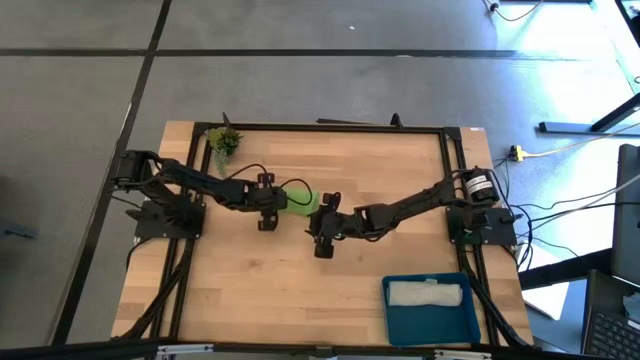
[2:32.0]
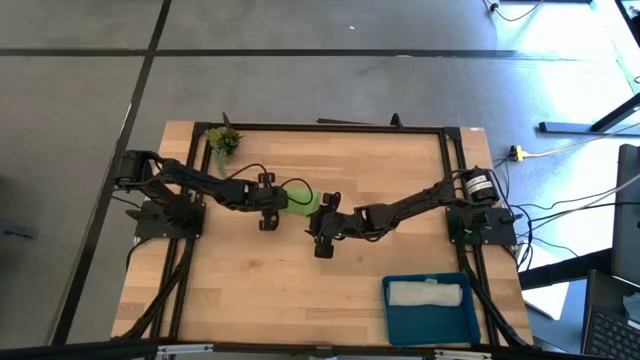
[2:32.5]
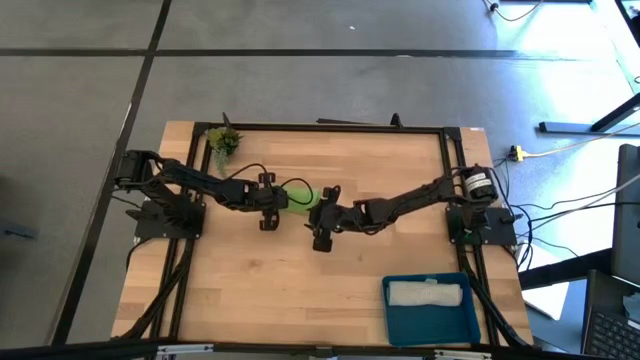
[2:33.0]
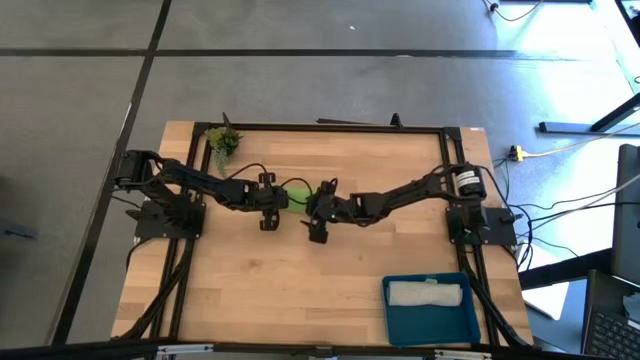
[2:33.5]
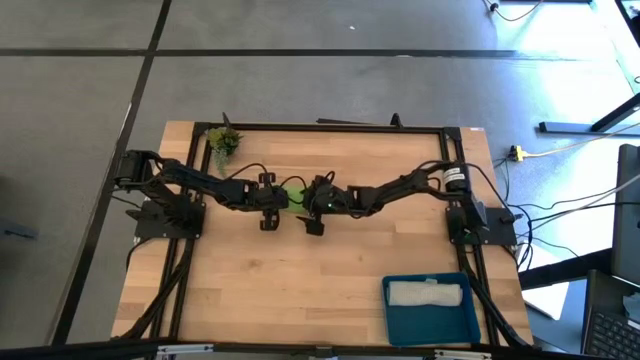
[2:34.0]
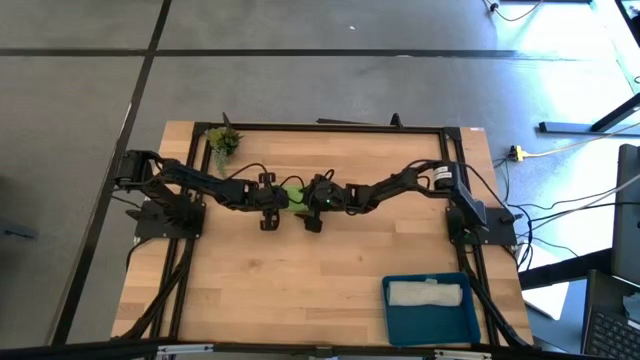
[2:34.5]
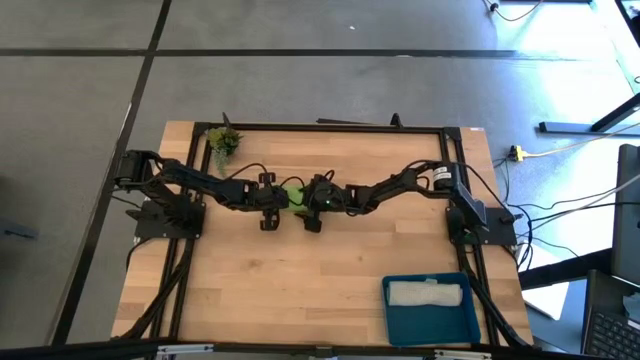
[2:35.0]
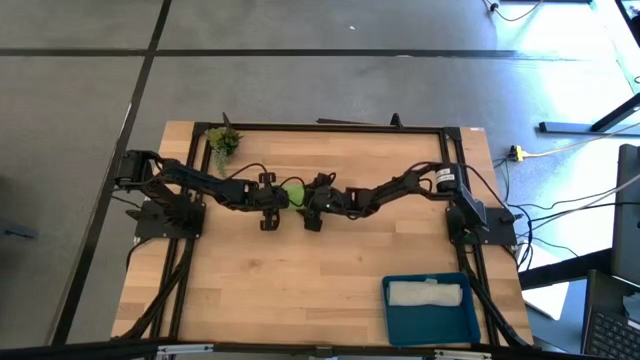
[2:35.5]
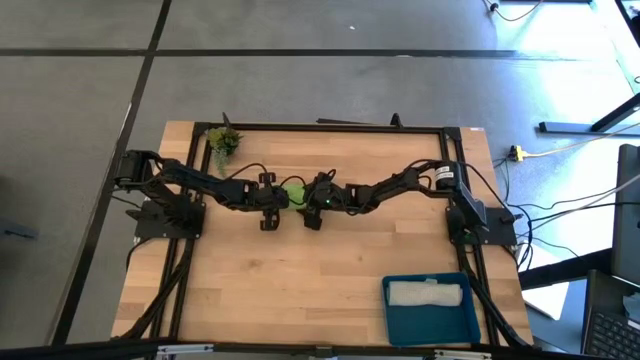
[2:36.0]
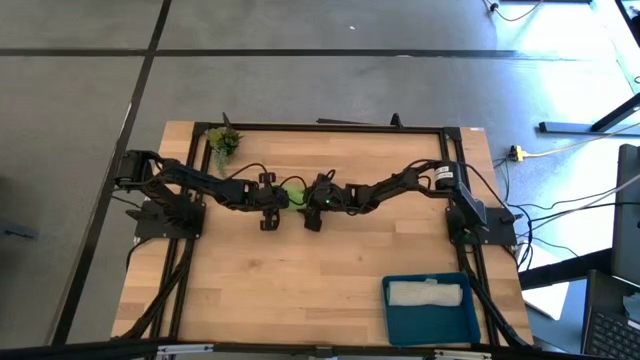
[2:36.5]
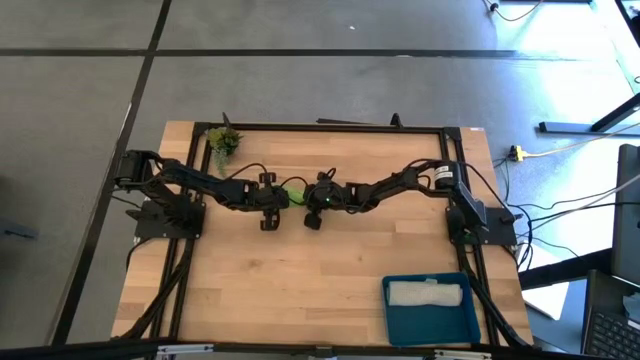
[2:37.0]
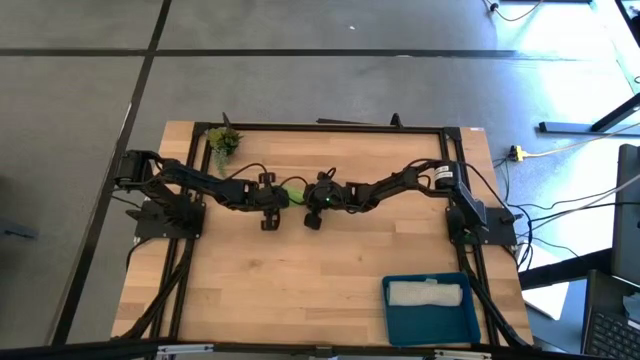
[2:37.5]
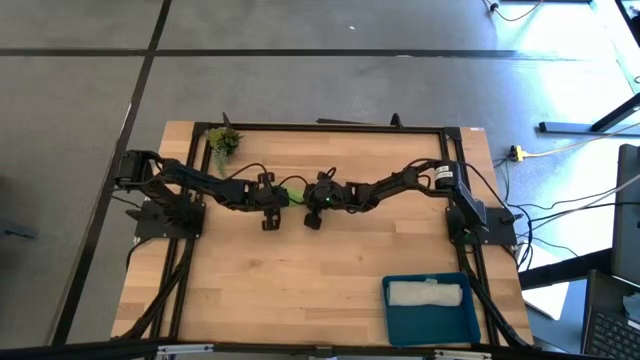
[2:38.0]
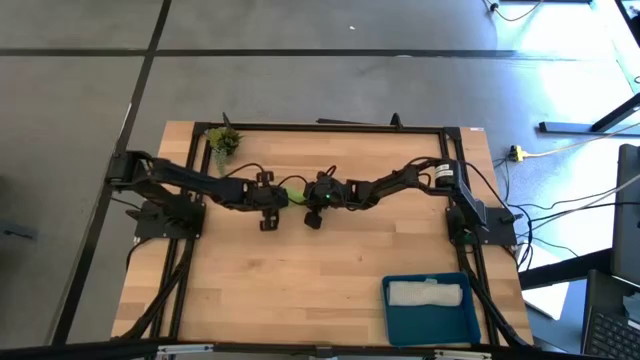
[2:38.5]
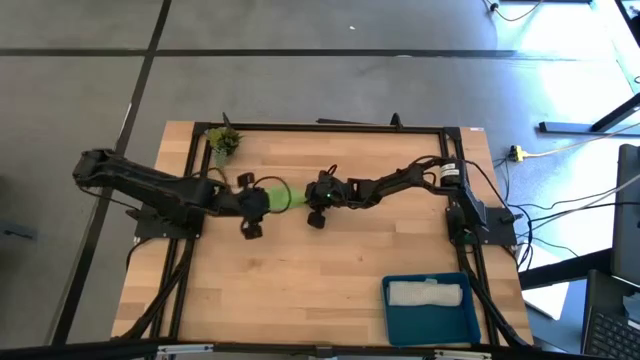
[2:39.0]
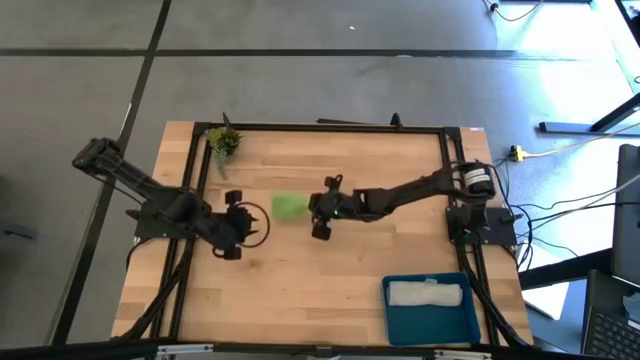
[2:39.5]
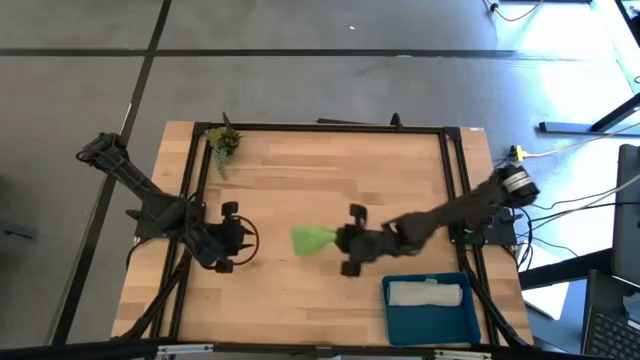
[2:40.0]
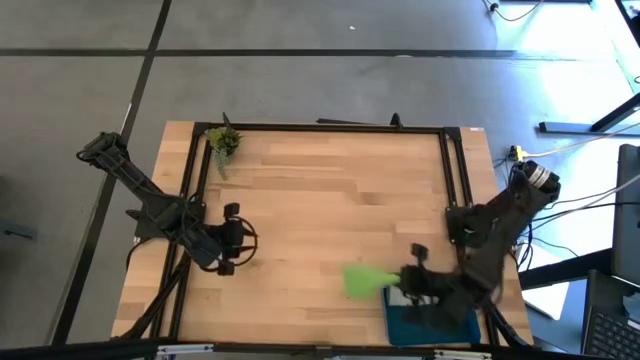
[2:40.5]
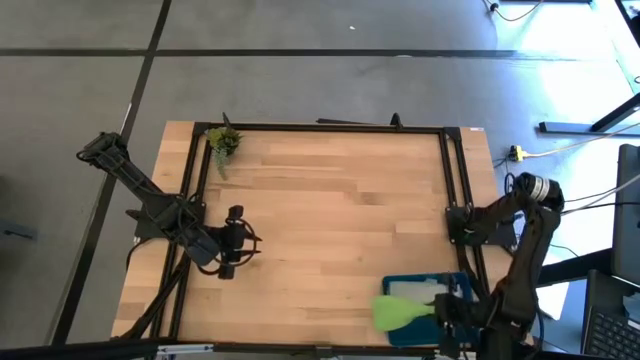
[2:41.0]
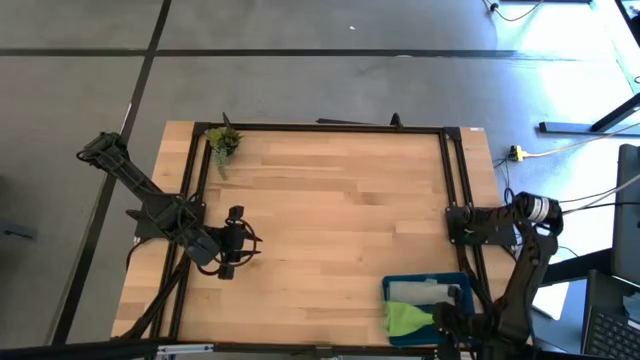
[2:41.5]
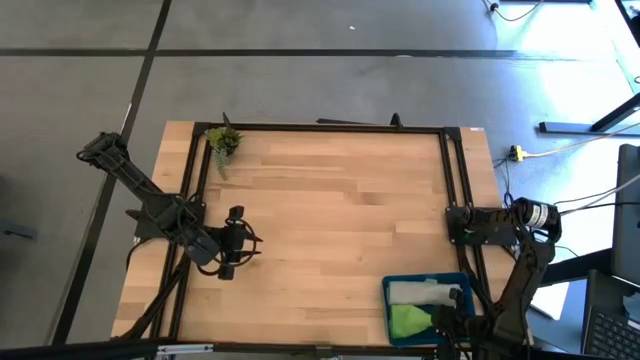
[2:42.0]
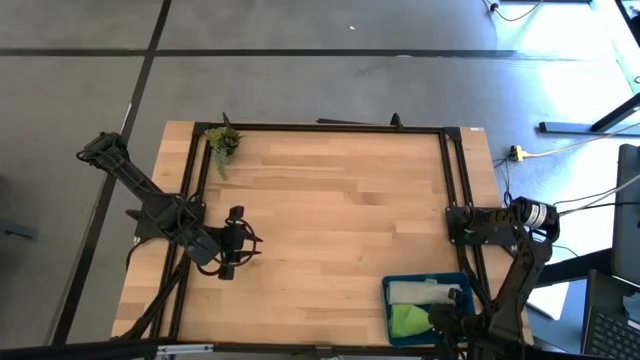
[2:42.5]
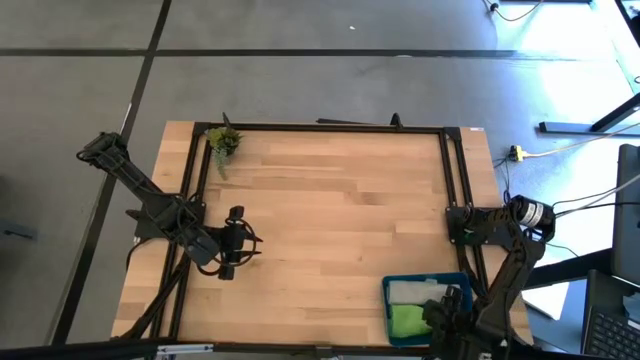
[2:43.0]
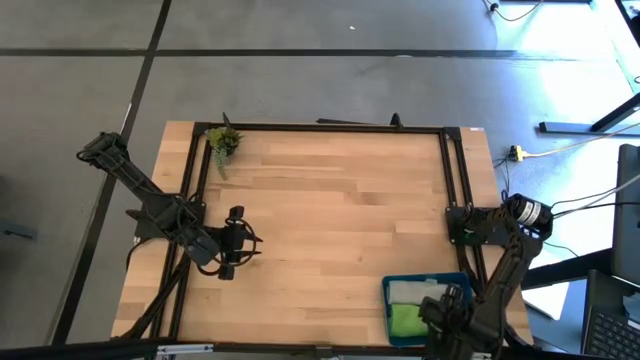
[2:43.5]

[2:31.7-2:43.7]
Task: Roll microfiber towels into tight, uniform cylinder then place into a basket
Put the green towel into the blue bin

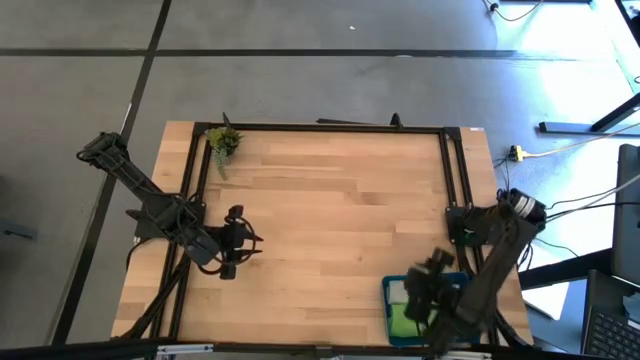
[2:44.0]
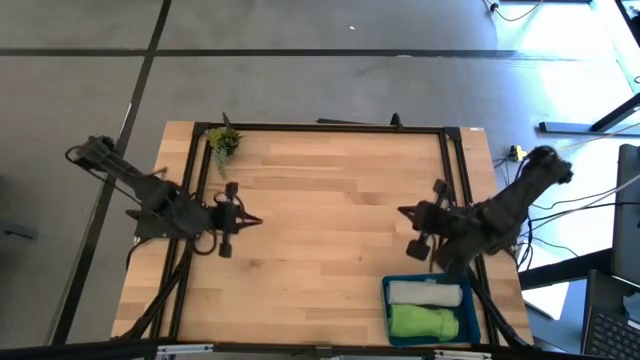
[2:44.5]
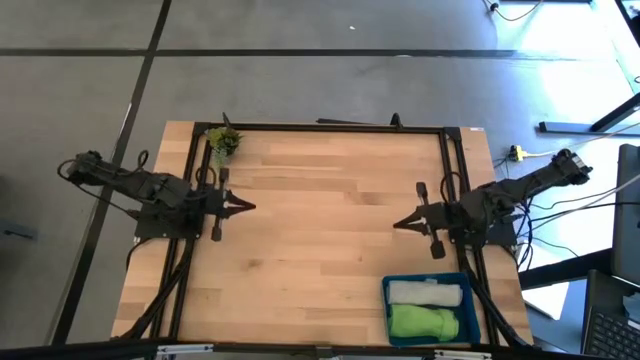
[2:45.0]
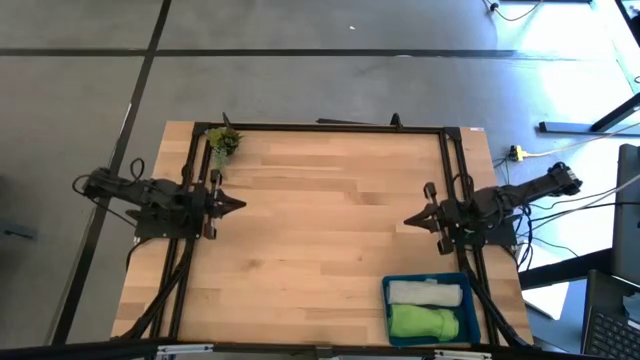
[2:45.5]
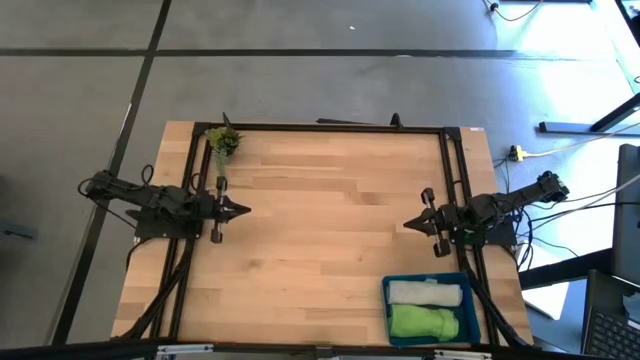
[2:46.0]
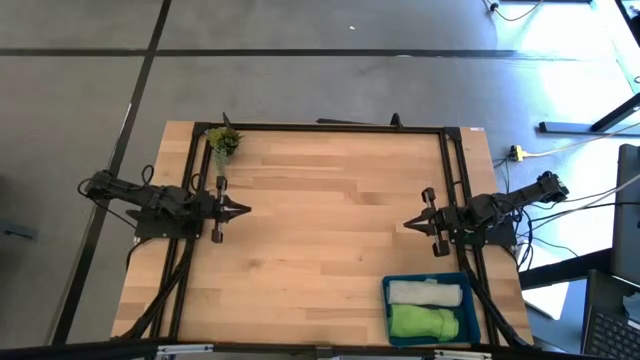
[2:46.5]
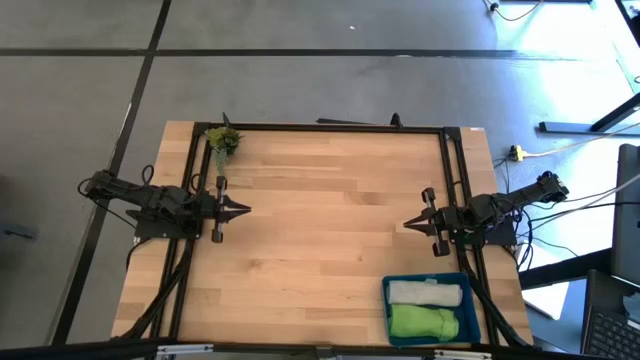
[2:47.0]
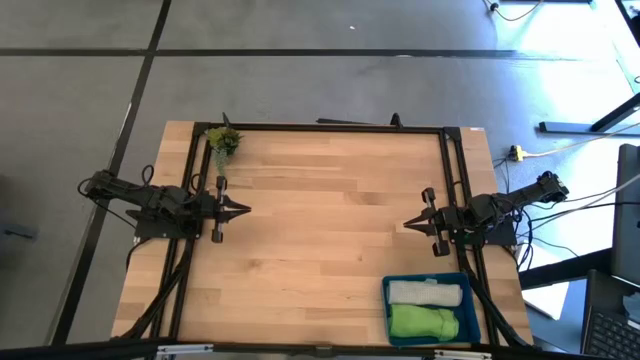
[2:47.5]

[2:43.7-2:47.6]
Return to Home Position

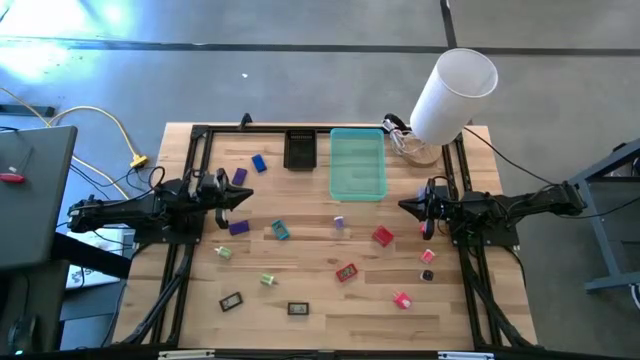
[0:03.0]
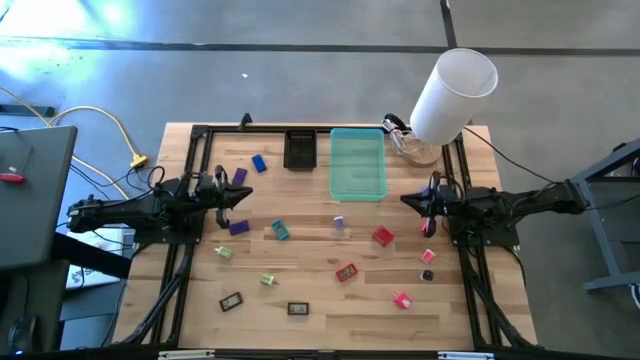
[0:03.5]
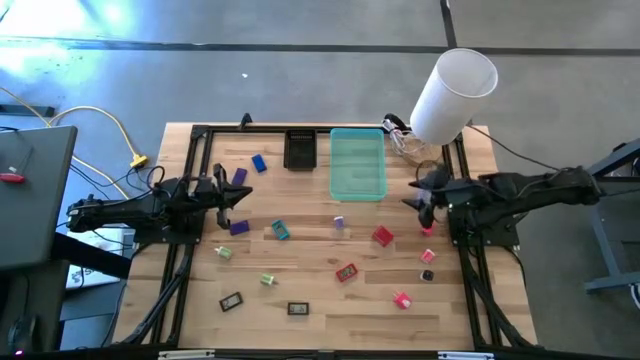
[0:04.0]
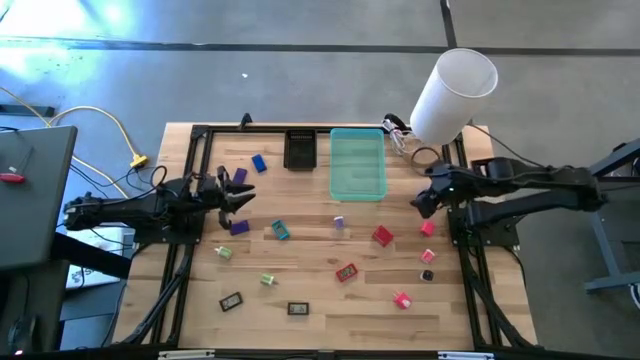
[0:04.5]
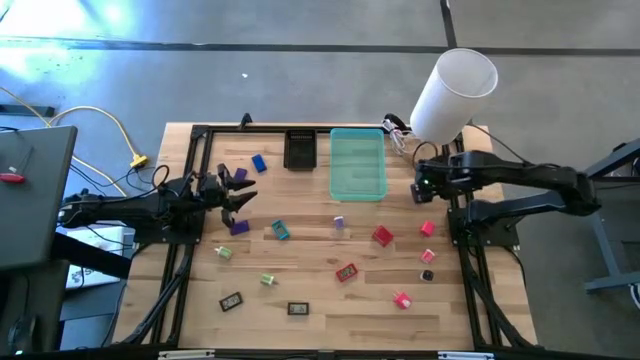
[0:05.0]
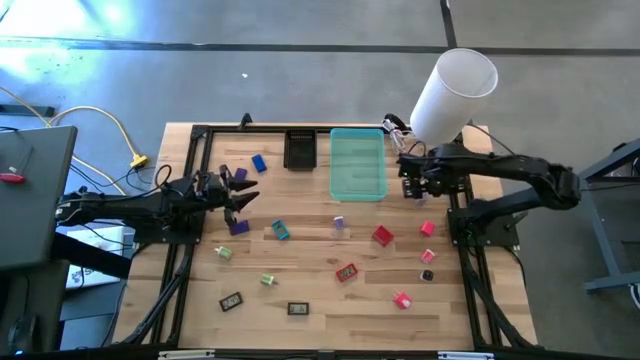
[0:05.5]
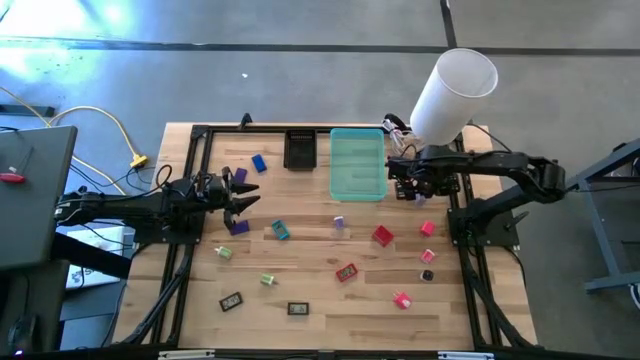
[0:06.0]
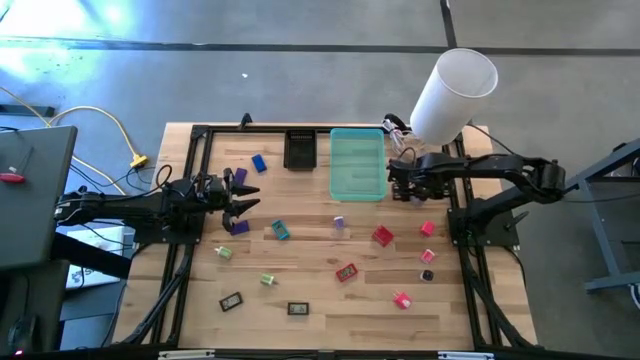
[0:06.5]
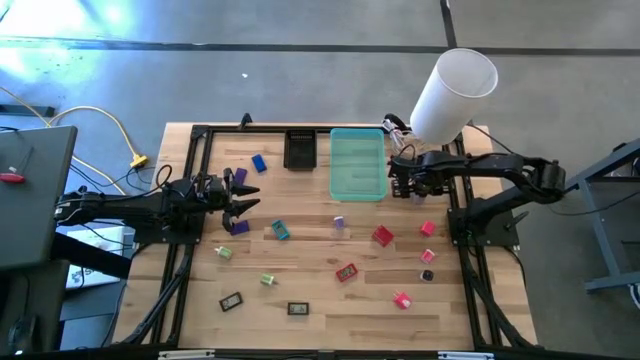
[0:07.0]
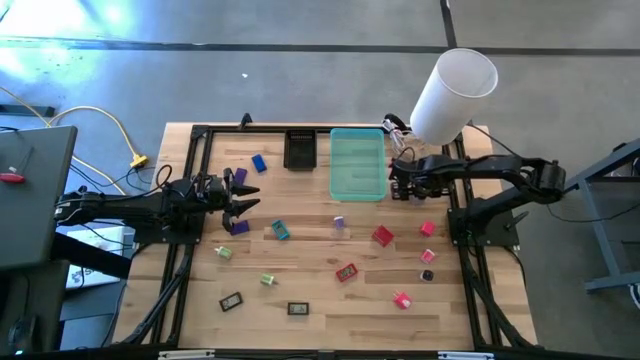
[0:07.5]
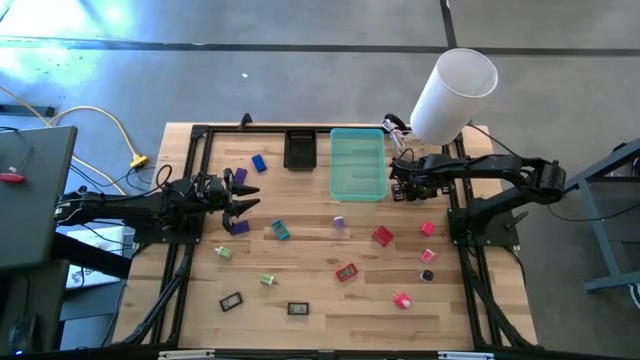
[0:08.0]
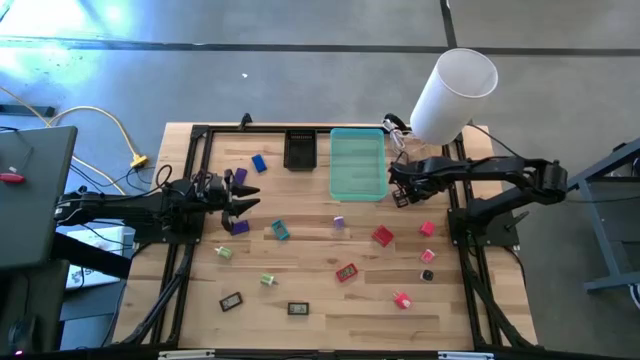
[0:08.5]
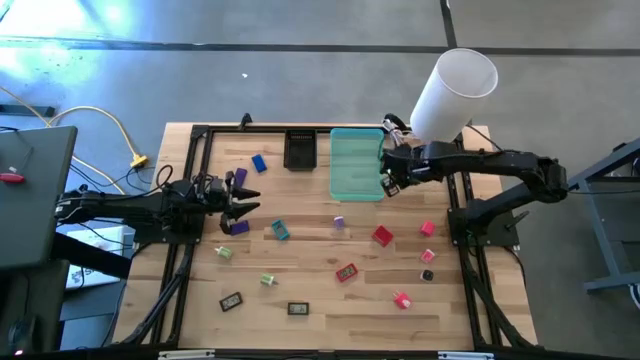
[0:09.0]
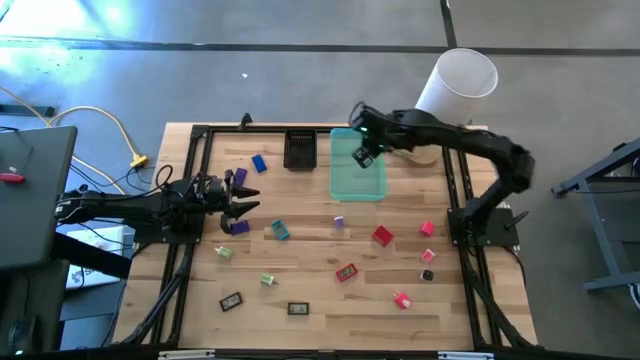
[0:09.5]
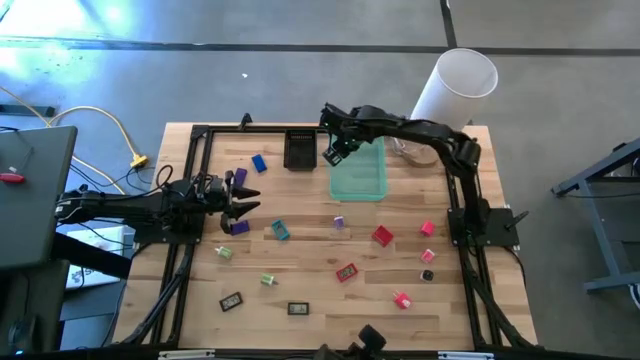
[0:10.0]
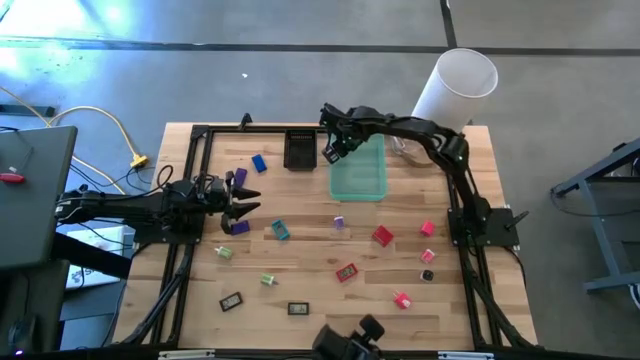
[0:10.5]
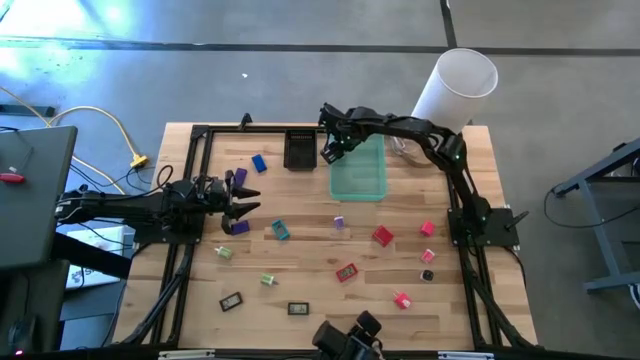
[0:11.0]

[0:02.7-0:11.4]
Task: Pick & Place Office items
Put the violet charger adapter into the blue bin
